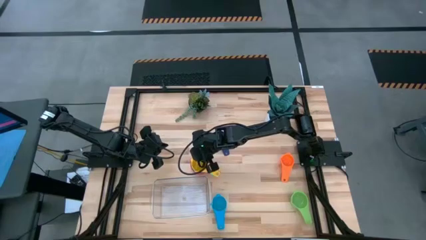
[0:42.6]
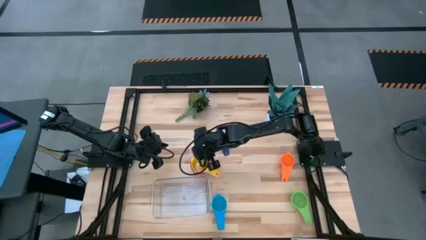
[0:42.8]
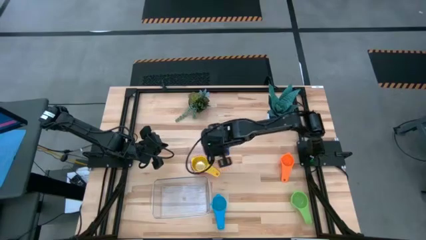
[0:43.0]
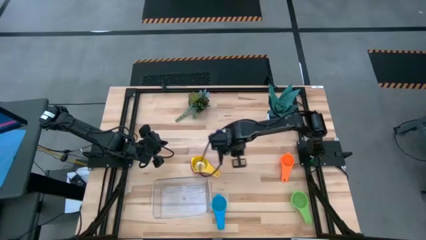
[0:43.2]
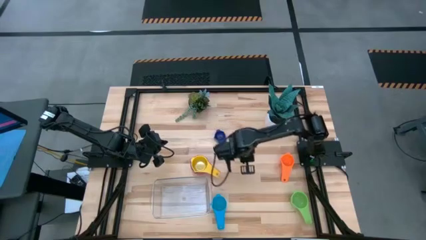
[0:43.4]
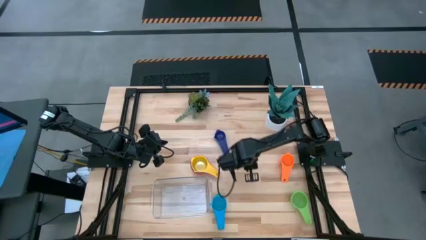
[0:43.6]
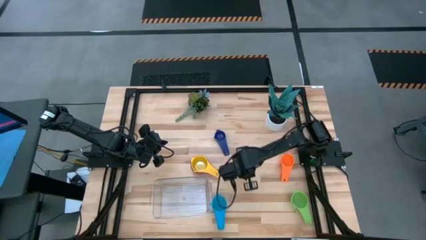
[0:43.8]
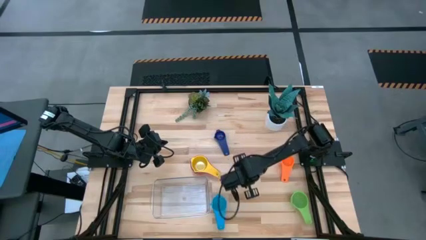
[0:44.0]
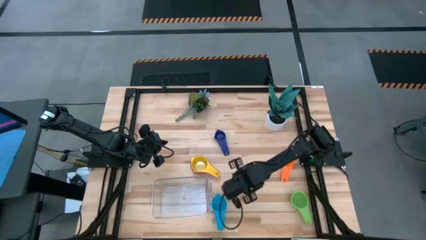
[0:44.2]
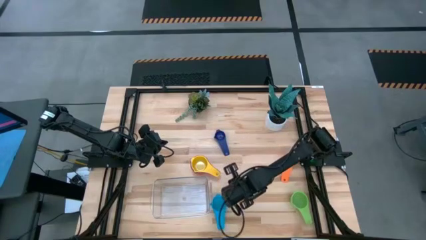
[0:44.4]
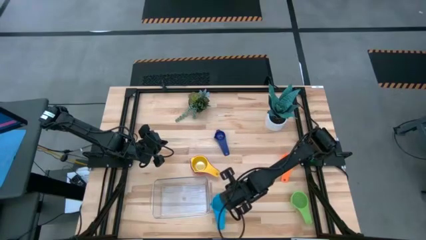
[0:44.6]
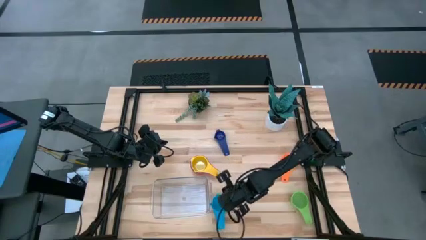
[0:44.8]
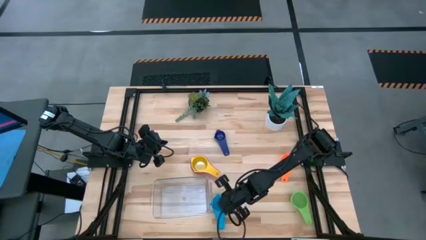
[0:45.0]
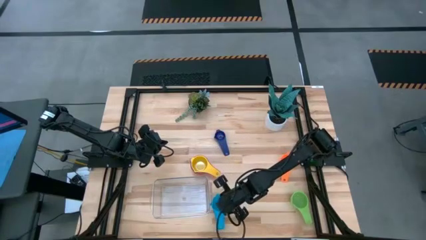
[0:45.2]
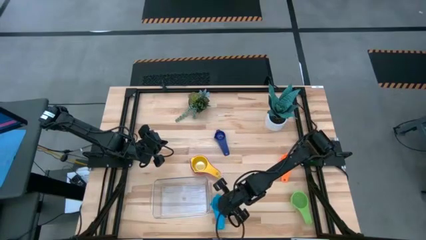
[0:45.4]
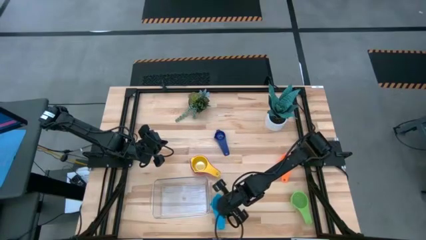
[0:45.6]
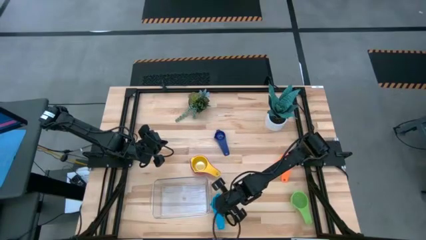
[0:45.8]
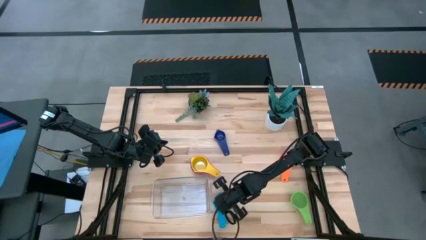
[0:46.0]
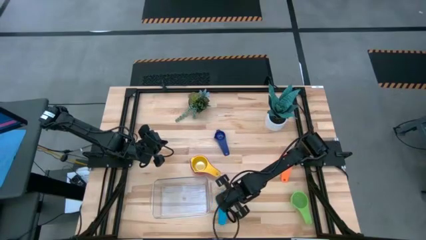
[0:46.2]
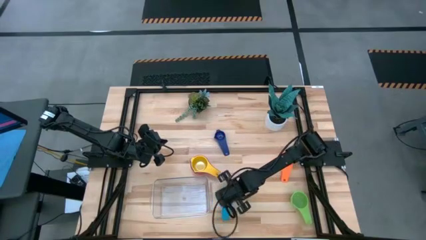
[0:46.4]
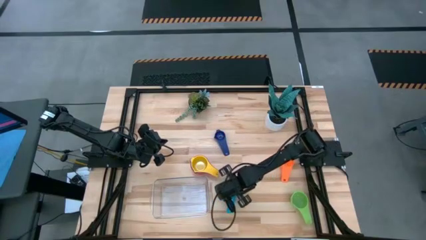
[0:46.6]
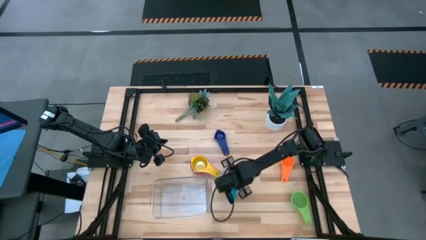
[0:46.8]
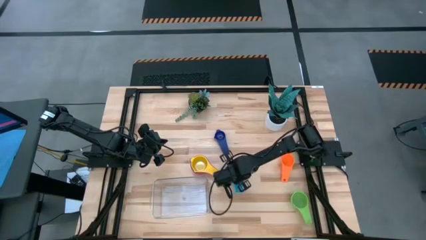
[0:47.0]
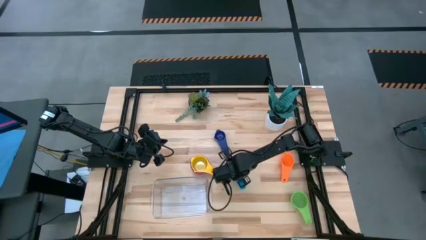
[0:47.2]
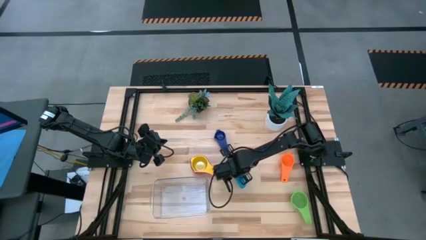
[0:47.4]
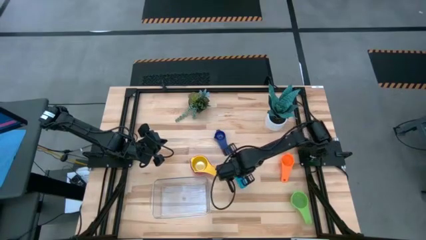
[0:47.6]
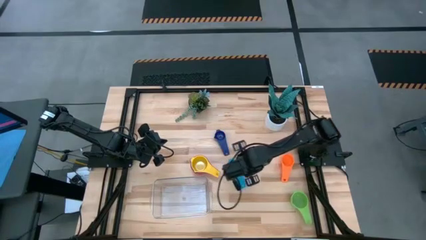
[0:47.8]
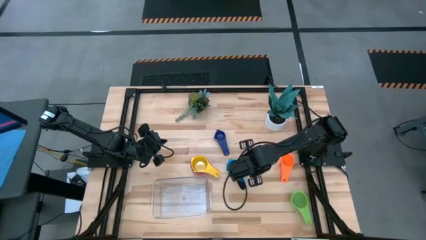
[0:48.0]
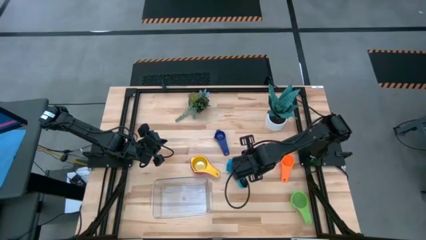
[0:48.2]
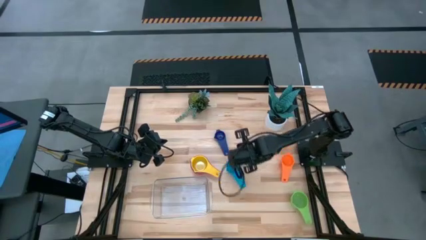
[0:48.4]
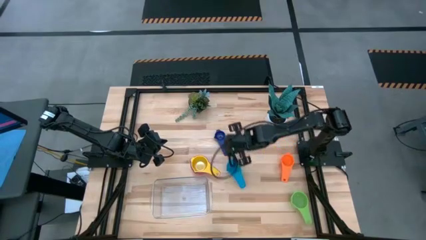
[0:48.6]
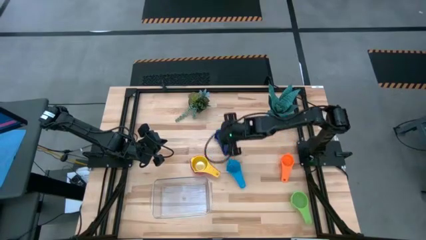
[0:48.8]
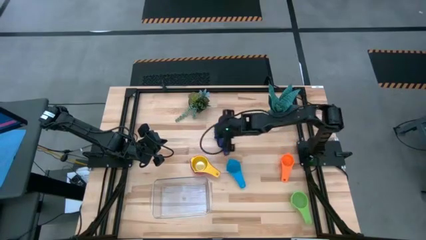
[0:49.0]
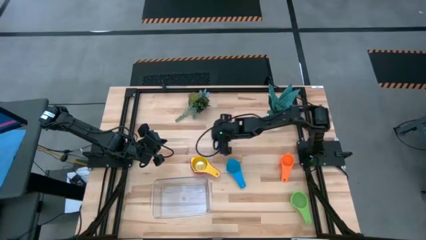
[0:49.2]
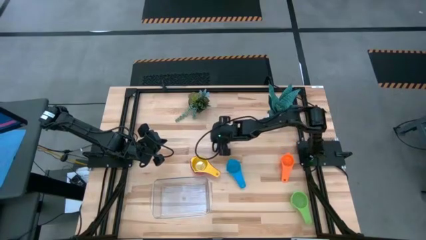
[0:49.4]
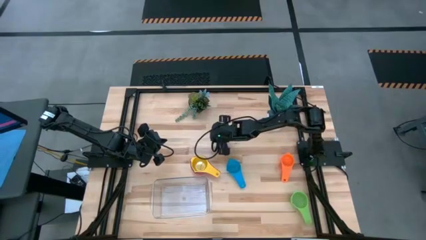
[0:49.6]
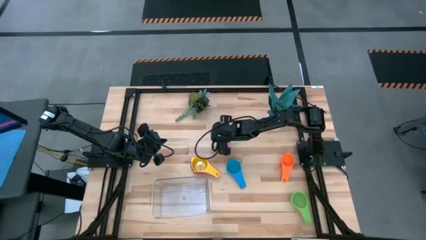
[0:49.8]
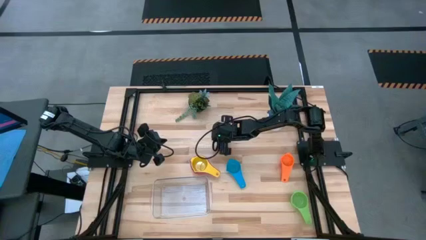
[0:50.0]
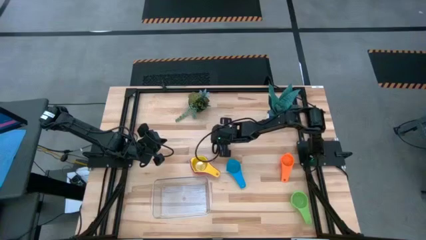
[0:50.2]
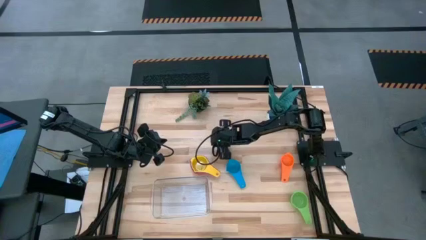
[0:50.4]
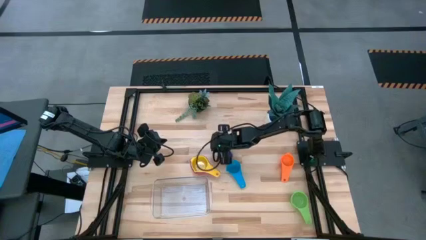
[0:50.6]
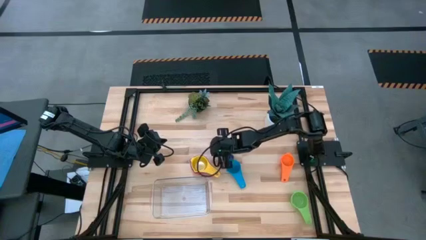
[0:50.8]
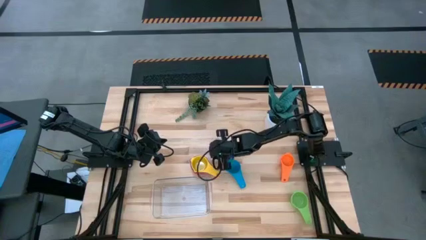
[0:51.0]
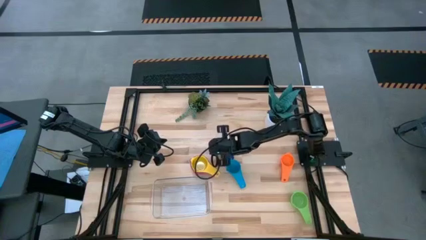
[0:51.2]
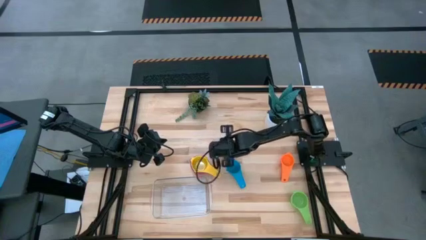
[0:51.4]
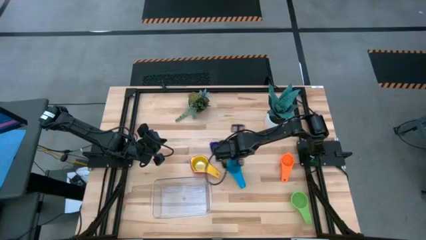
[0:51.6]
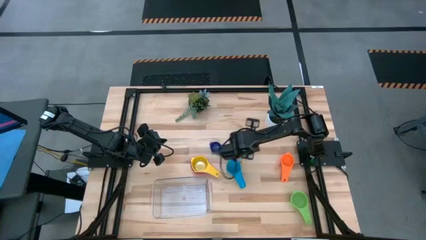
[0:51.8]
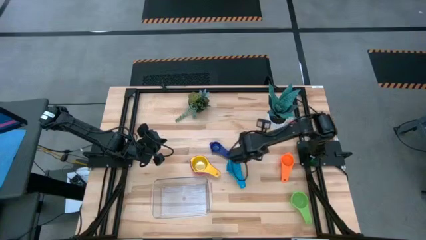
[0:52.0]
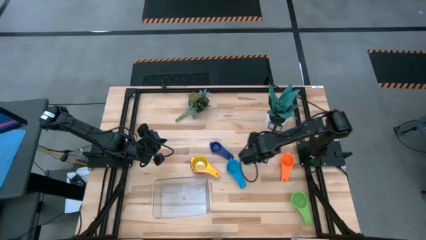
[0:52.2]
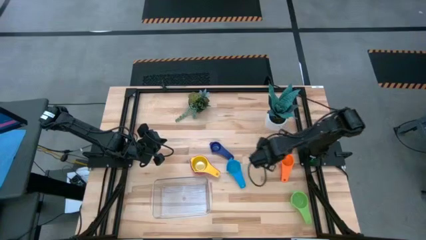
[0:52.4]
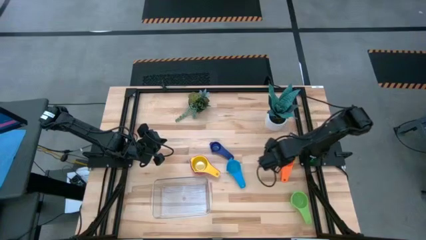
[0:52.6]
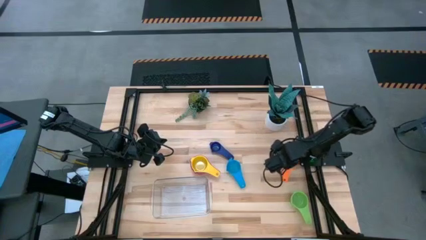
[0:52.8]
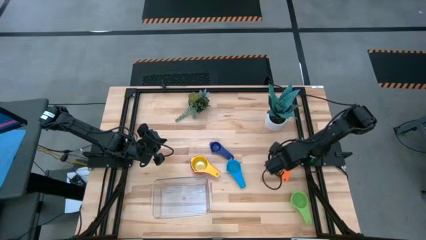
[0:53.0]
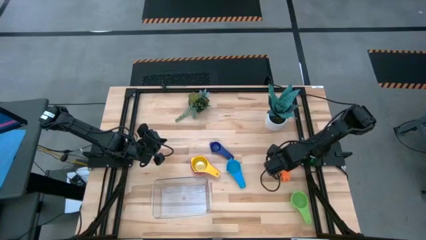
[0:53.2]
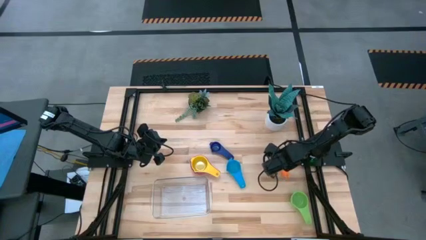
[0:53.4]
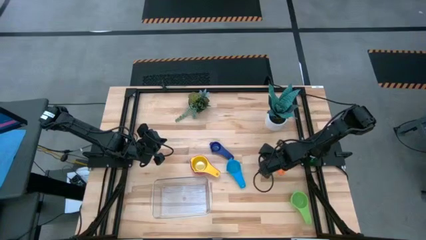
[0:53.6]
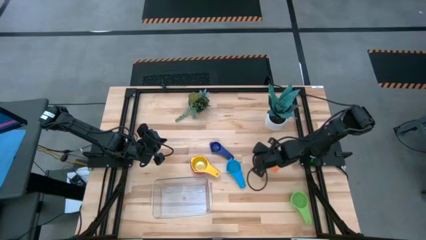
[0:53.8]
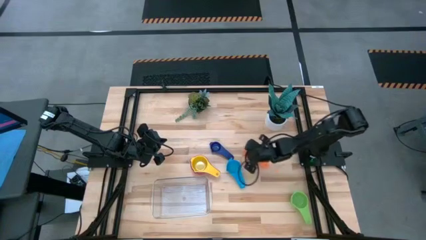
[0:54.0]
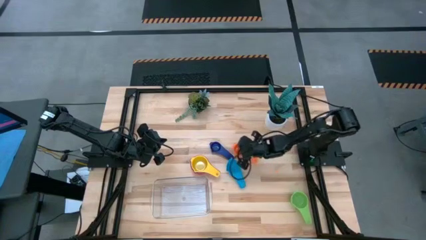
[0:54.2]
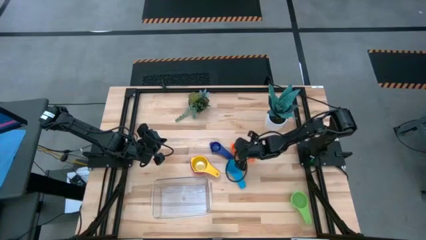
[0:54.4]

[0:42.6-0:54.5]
Task: Nest measuring cups in basket
Move the measuring cups to the center of the table

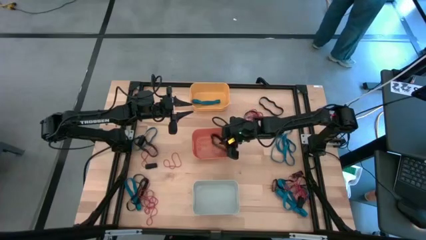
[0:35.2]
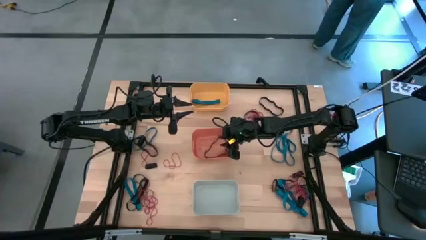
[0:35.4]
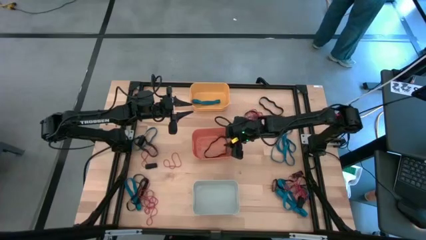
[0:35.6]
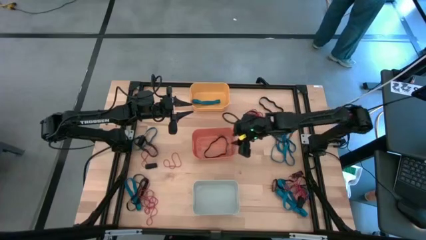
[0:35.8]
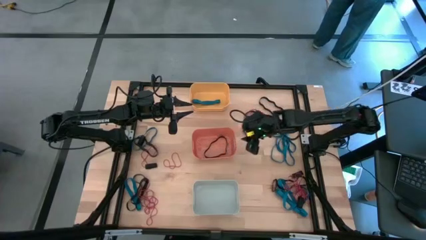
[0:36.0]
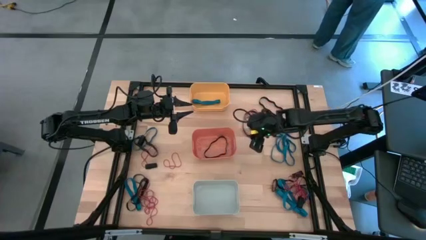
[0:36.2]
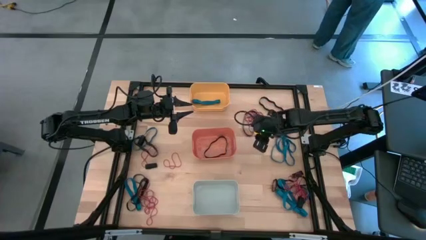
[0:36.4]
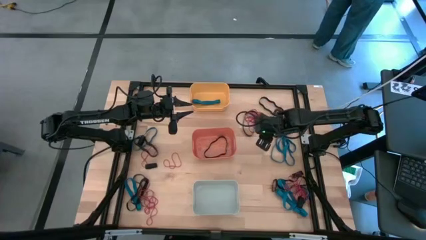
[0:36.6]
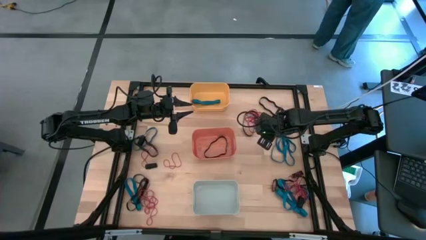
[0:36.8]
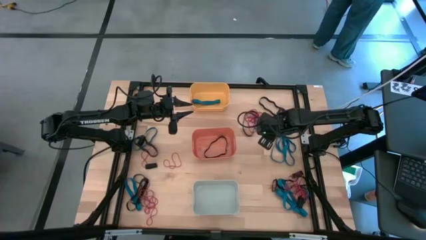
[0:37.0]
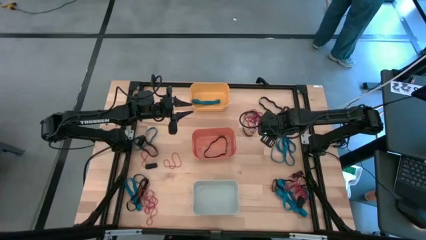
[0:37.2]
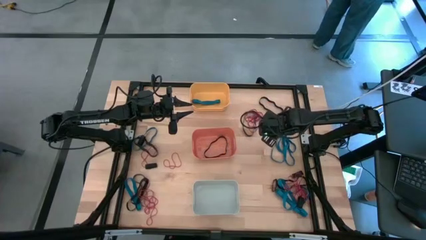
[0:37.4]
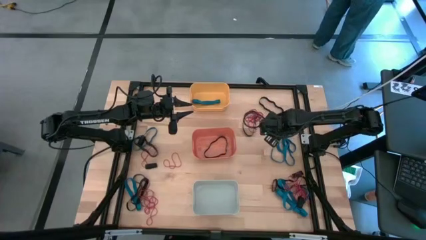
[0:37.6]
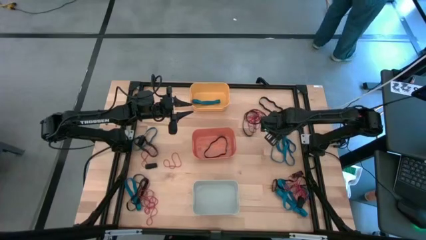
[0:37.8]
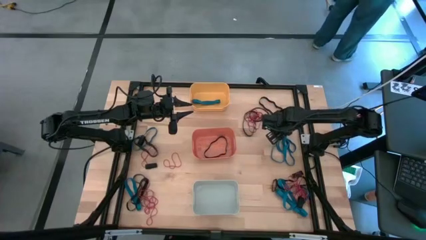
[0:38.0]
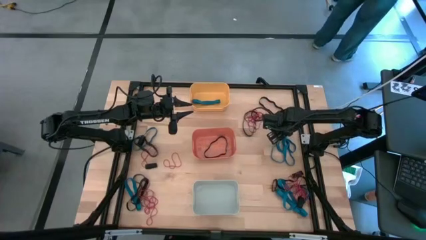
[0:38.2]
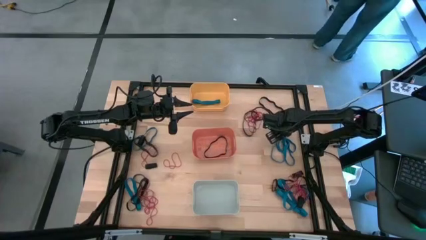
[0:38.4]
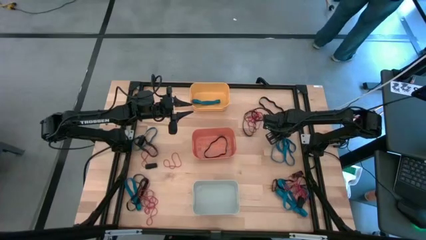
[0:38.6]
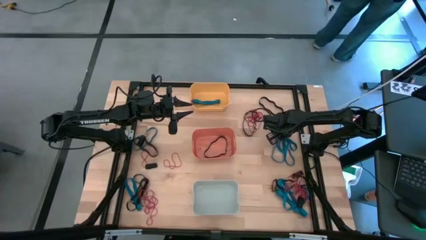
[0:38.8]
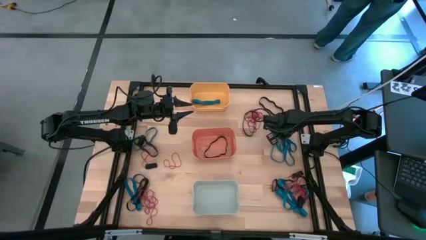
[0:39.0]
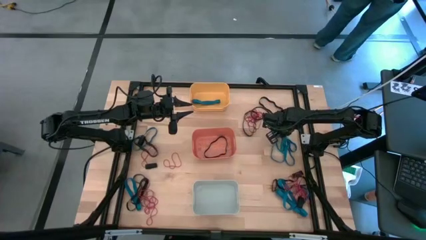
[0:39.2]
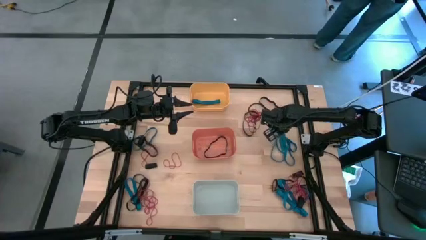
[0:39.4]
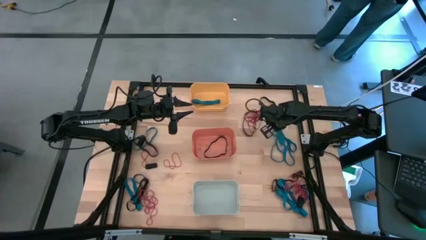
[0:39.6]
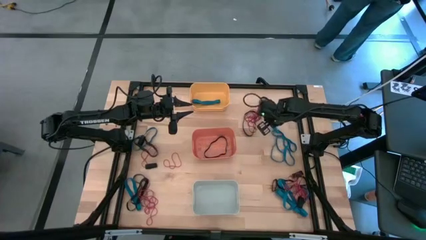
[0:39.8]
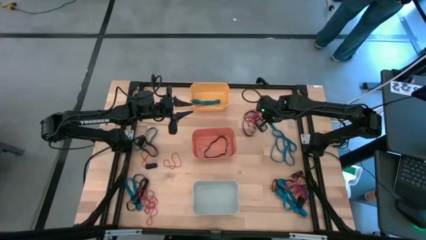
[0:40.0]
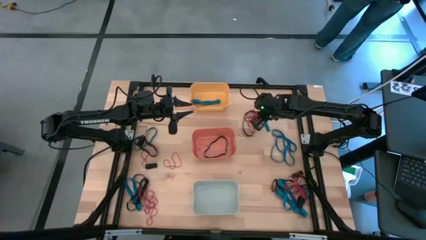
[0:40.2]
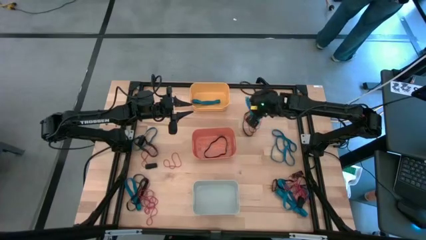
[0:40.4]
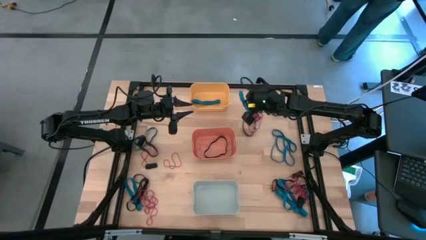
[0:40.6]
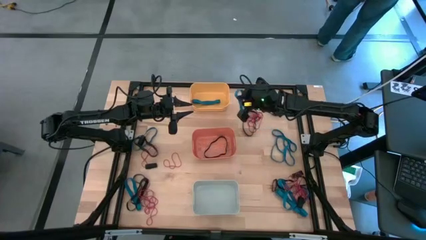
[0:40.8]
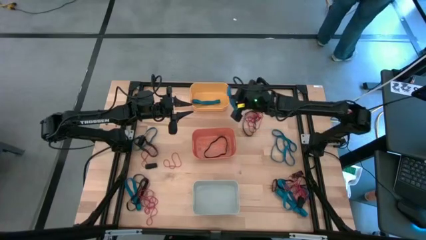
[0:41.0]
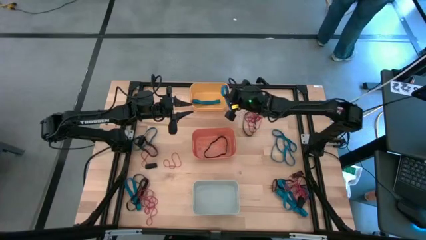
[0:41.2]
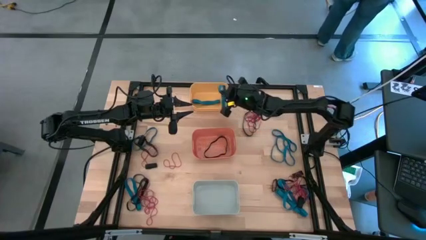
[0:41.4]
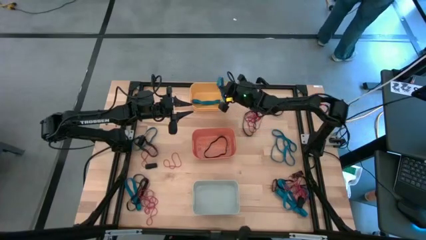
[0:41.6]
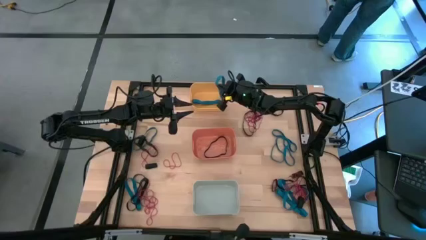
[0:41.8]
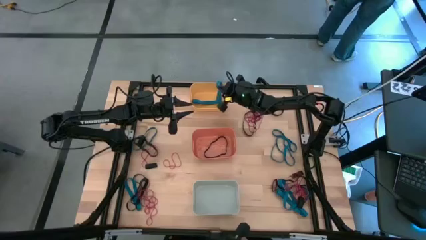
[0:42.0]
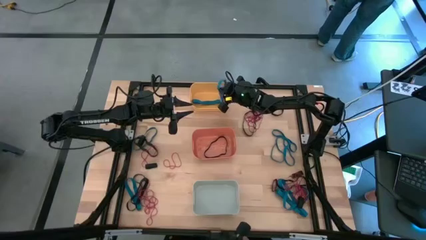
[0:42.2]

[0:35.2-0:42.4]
Task: Sort rubber bands into baskets
Put the blue rubber band in the yellow bin
